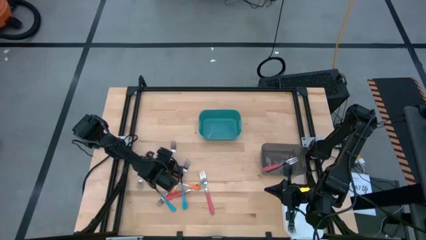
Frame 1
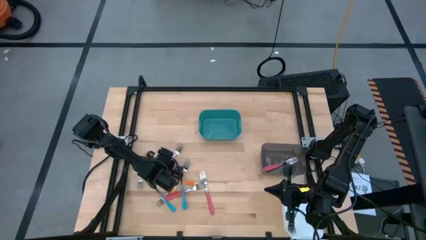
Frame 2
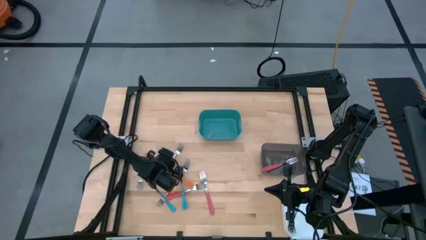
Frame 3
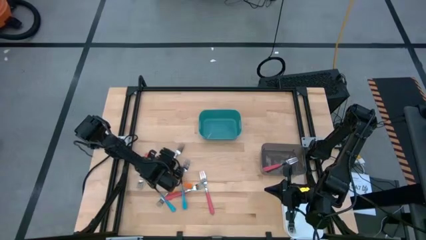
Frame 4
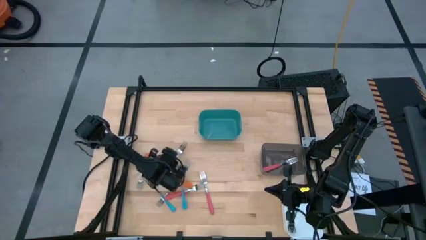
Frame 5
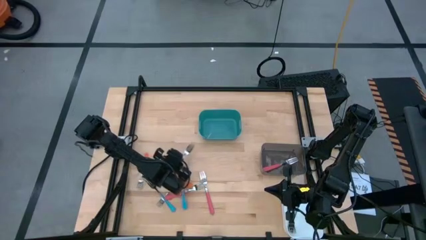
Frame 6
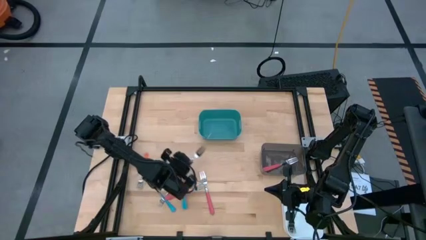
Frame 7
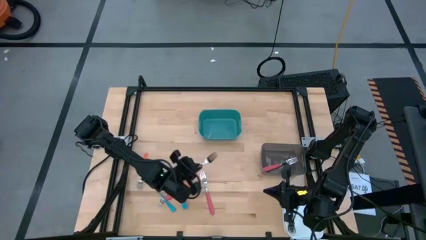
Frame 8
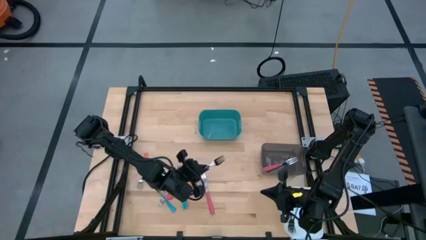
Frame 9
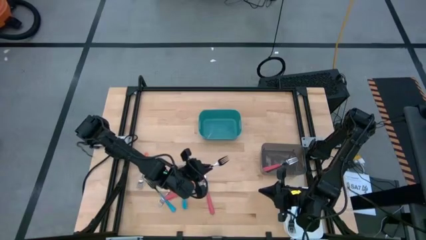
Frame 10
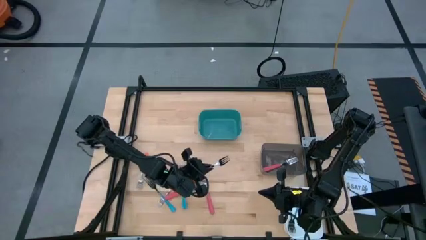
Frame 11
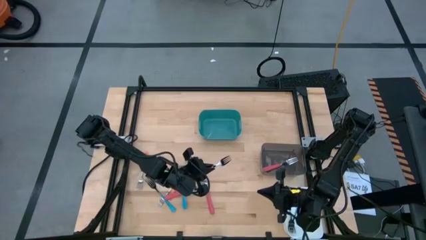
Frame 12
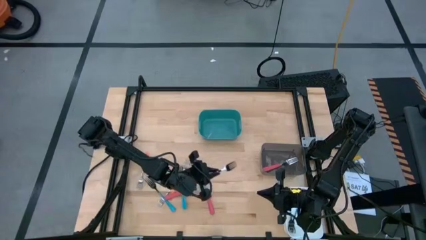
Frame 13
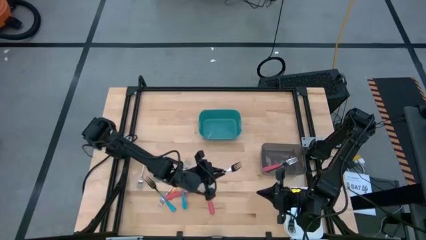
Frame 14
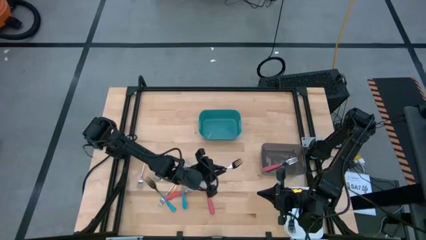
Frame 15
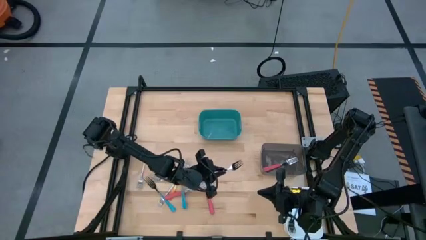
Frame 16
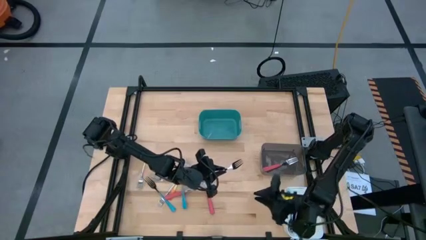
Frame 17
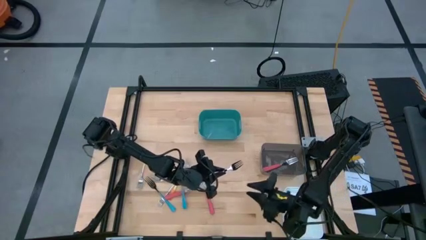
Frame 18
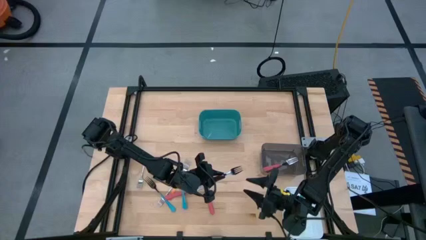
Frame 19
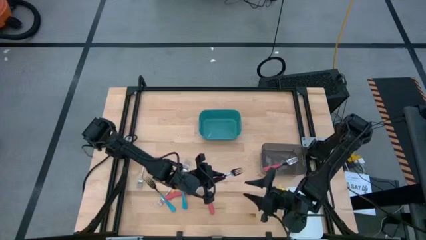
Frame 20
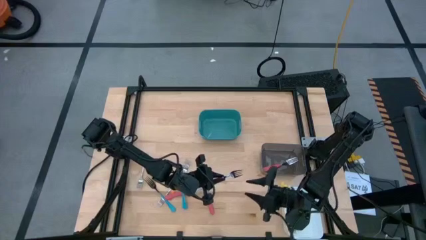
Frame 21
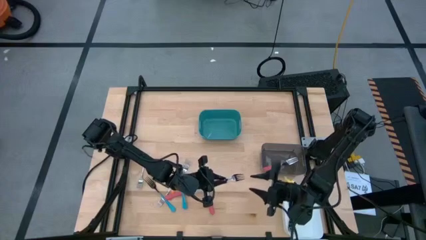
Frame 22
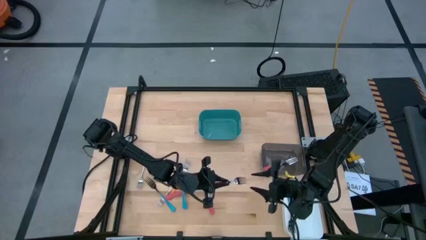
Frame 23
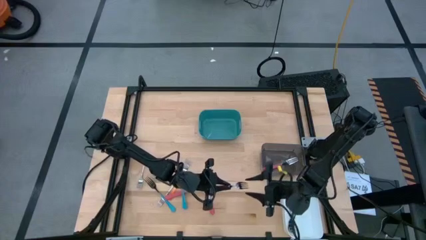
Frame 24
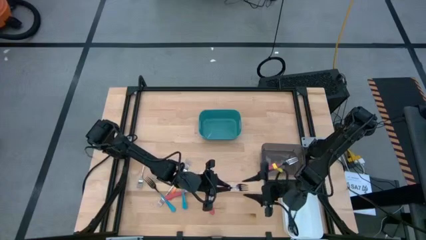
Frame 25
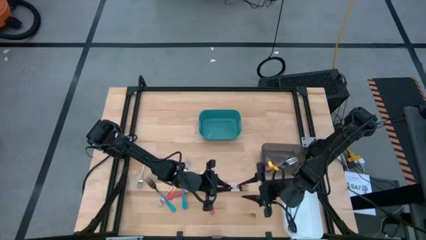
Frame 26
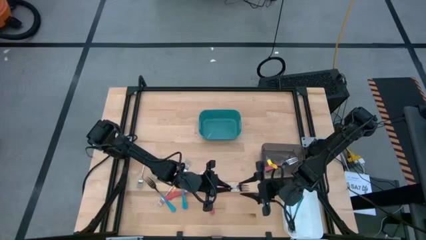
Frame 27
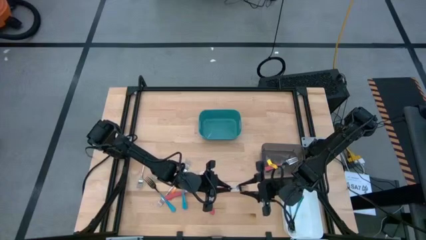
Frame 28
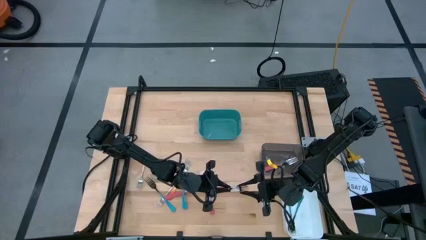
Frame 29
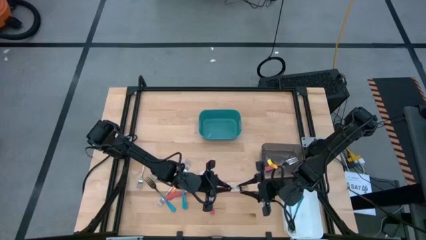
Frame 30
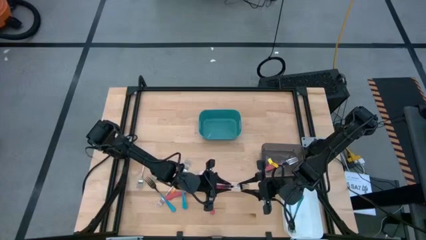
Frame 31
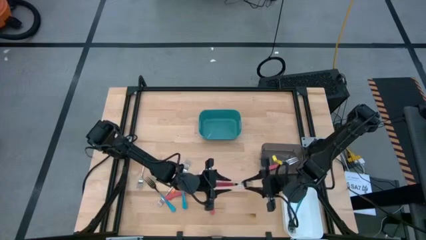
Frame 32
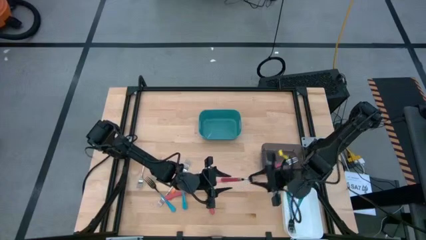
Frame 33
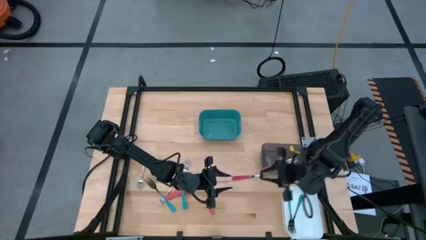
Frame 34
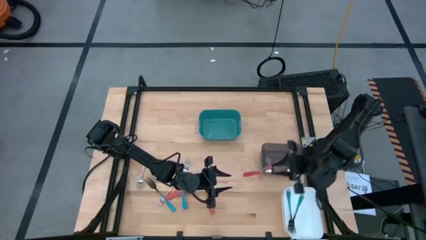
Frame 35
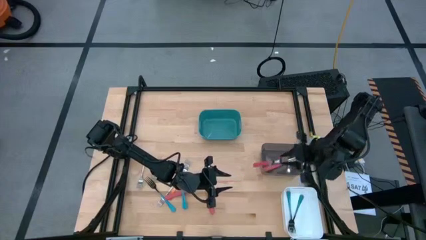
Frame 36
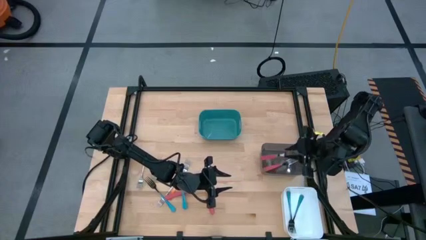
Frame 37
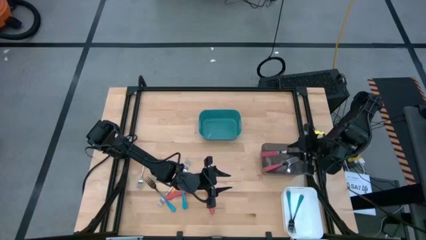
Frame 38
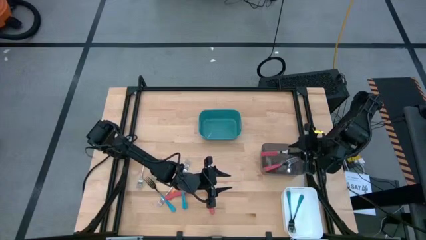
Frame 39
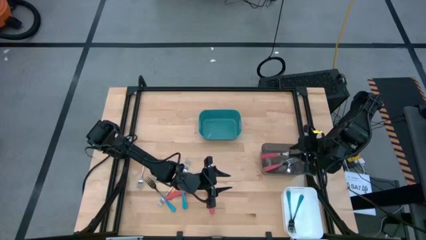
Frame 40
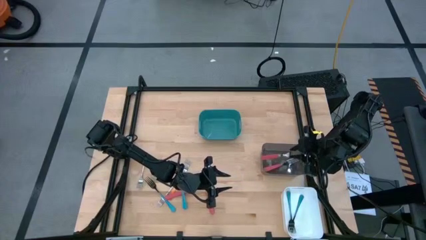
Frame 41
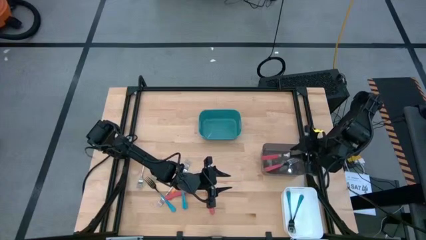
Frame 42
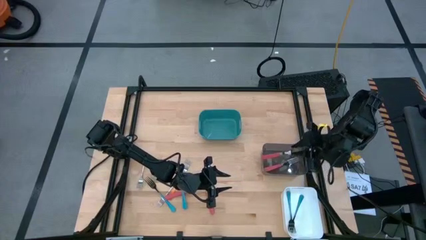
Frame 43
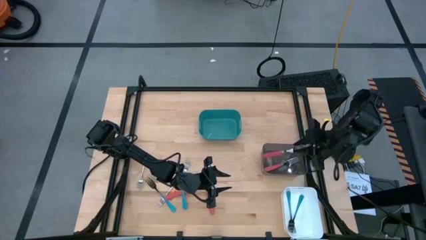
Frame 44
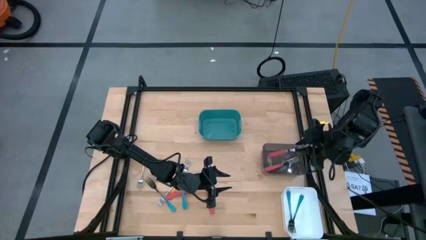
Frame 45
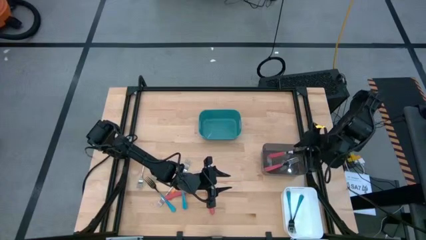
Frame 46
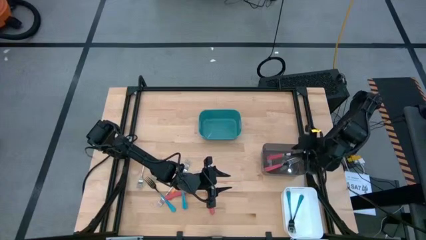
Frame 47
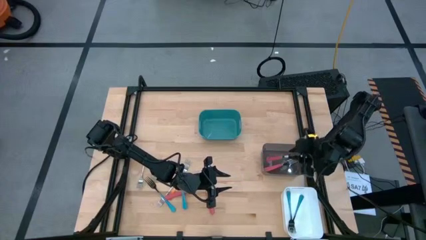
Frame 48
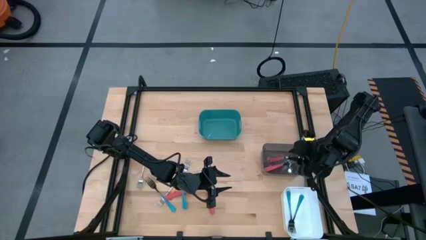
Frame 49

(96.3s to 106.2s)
Task: Sort silverware by color (type)
Put the pink fork into the black bin

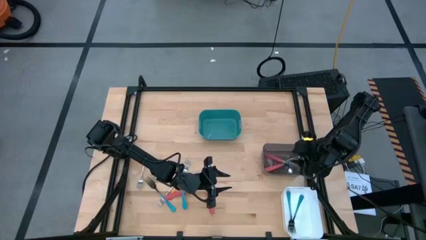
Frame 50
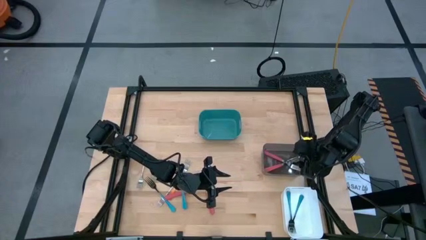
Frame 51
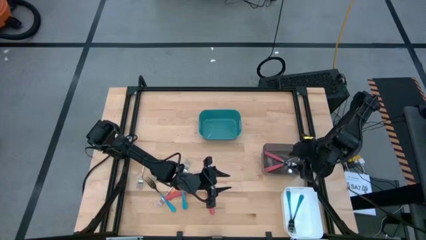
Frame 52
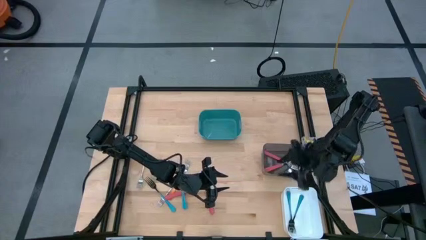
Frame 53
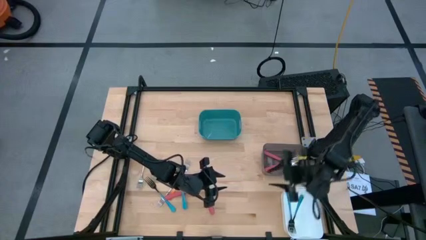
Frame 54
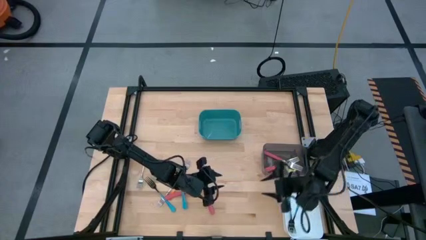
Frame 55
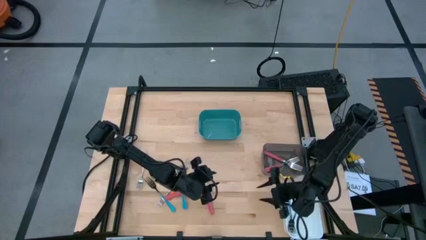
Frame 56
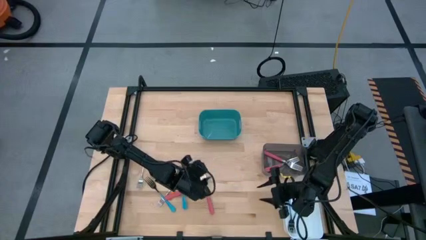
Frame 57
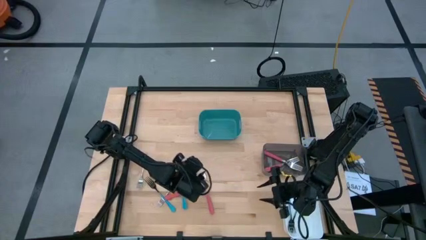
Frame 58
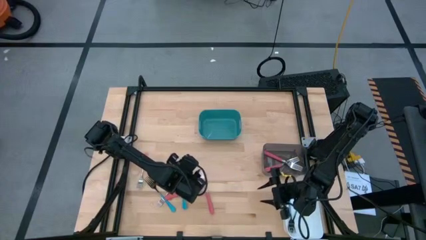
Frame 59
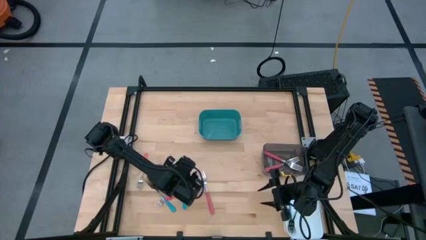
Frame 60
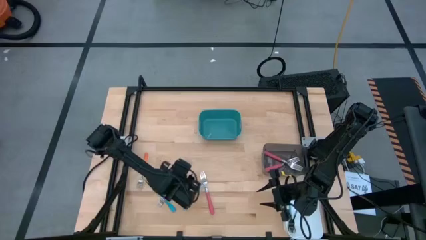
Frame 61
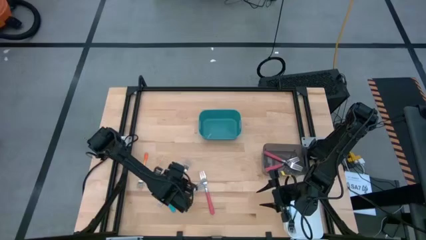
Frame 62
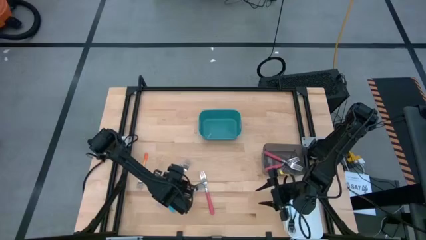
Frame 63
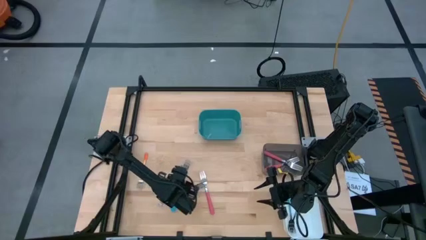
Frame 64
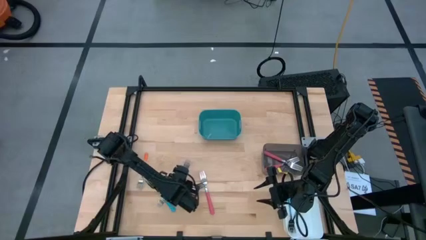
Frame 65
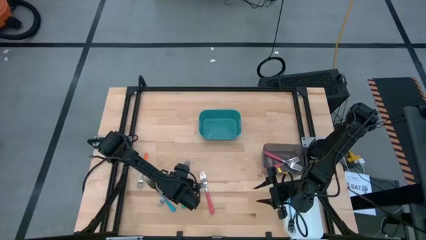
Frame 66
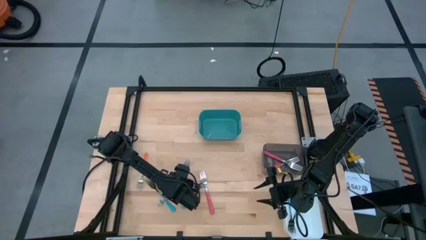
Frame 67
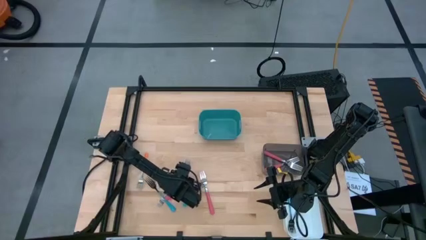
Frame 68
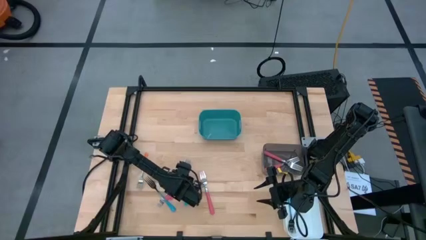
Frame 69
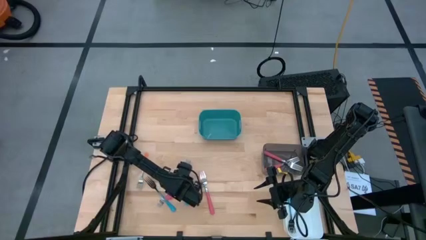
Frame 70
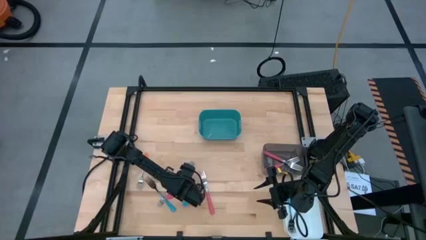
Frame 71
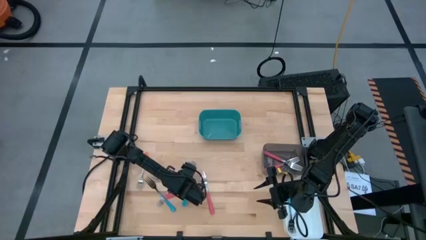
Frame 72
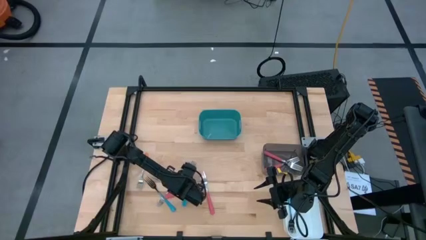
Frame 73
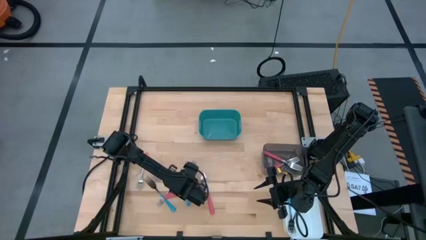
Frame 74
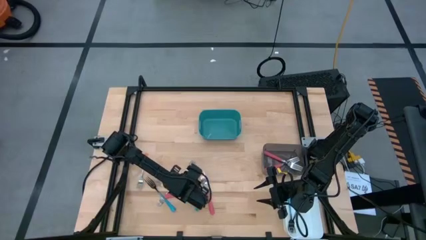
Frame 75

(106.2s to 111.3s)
Put the blue fork into the white bin
